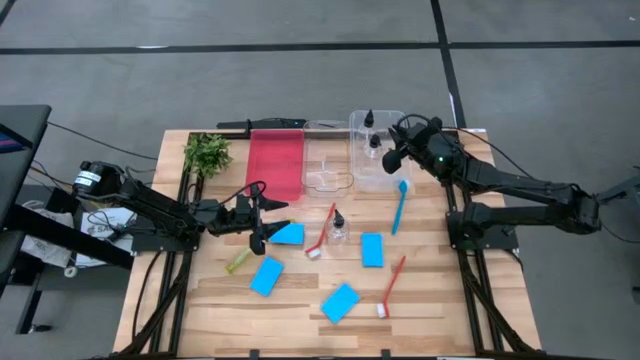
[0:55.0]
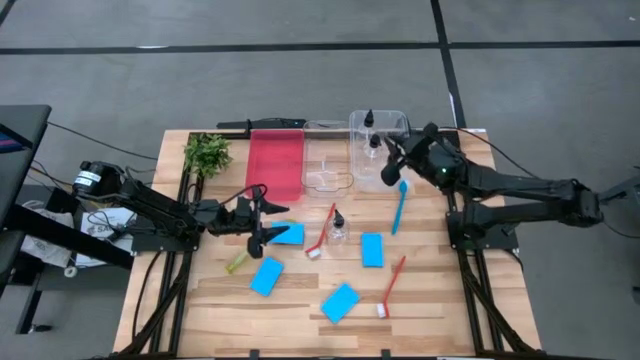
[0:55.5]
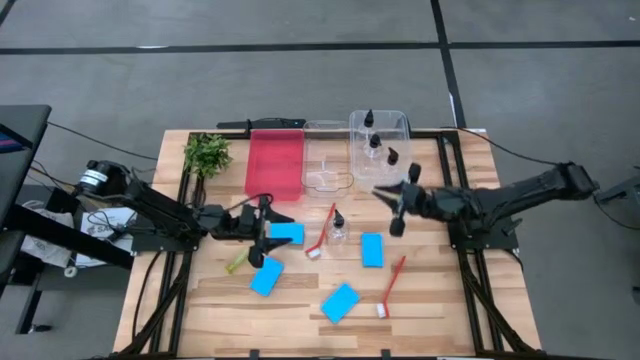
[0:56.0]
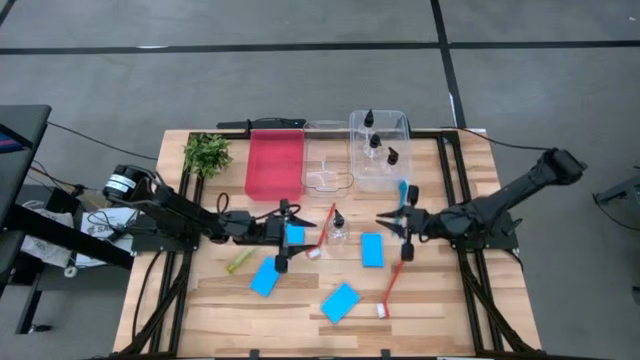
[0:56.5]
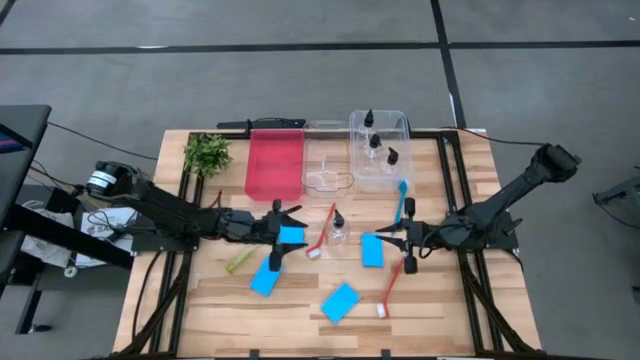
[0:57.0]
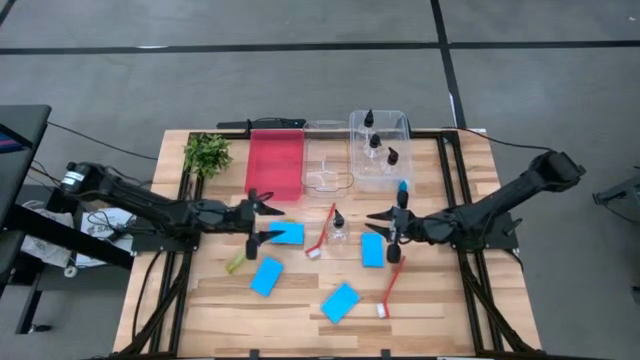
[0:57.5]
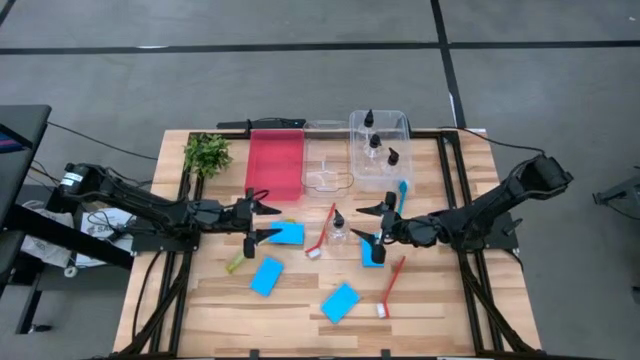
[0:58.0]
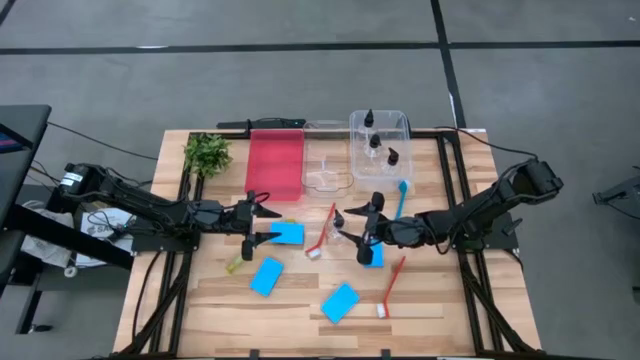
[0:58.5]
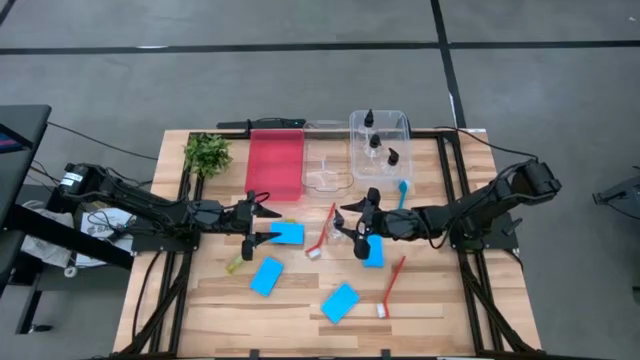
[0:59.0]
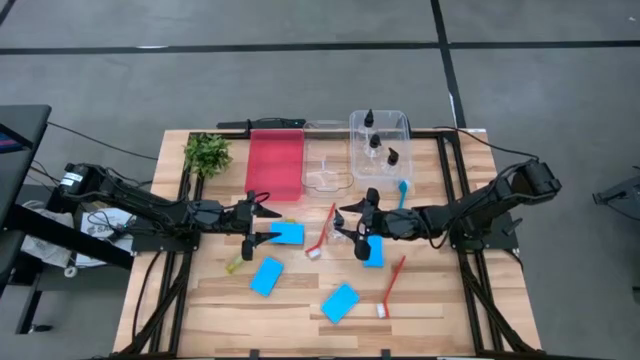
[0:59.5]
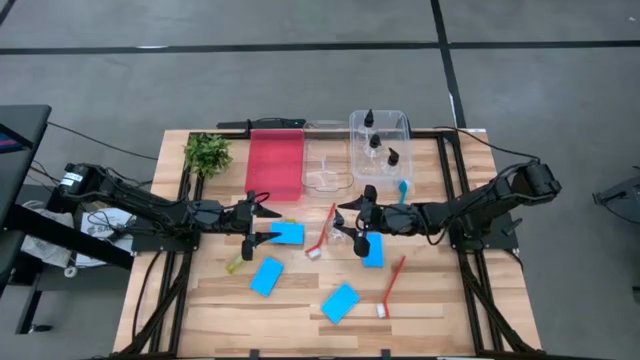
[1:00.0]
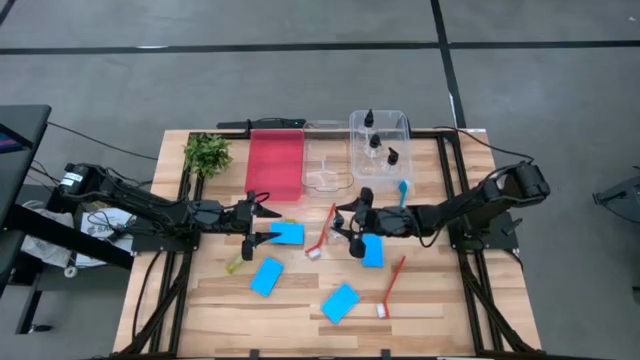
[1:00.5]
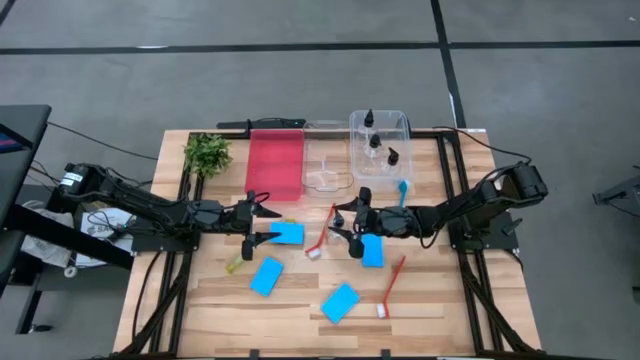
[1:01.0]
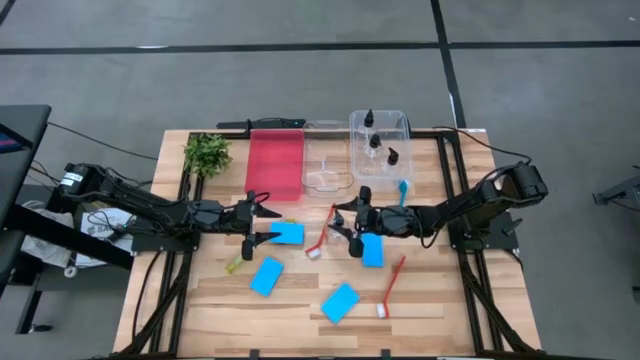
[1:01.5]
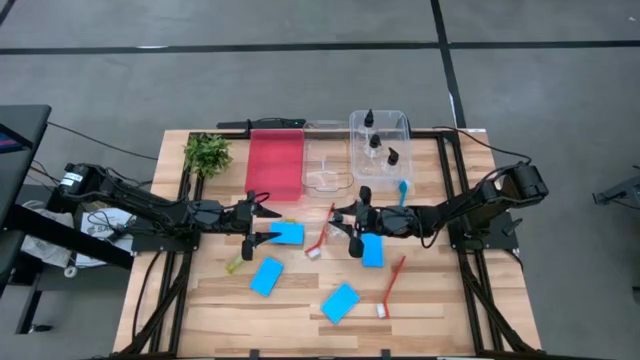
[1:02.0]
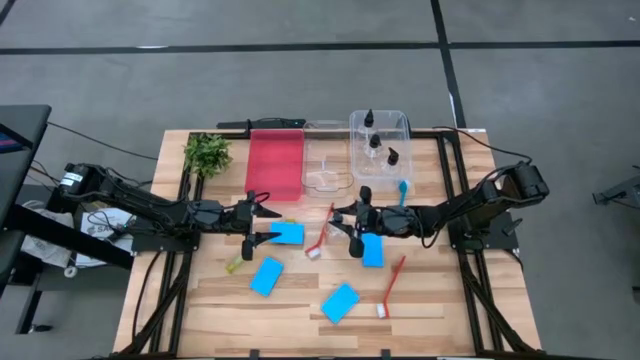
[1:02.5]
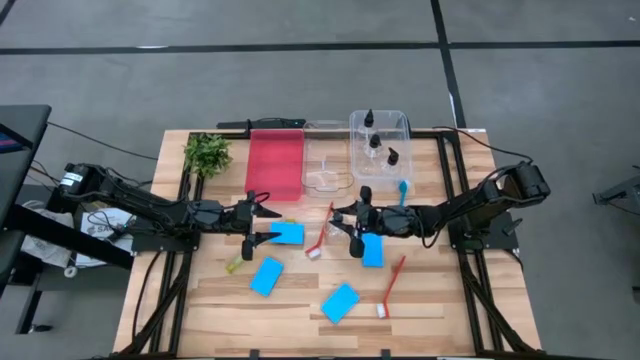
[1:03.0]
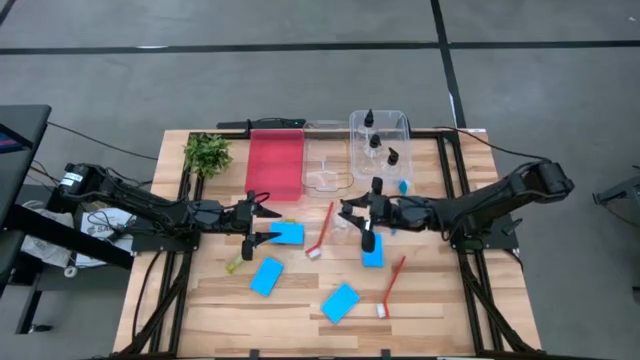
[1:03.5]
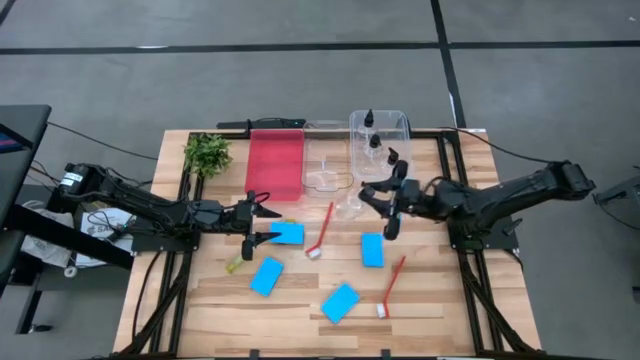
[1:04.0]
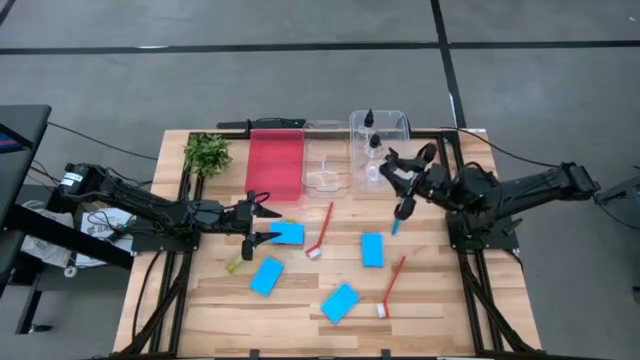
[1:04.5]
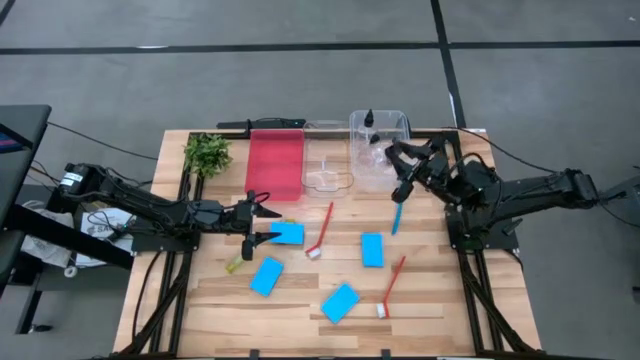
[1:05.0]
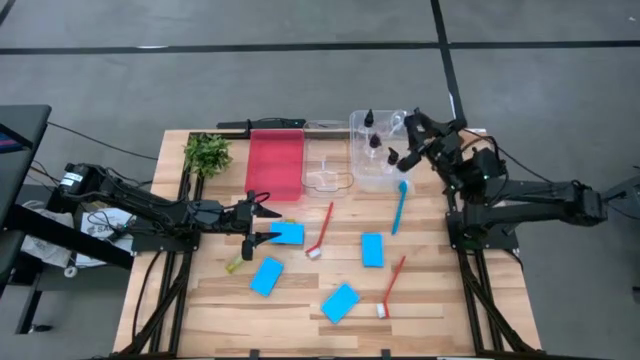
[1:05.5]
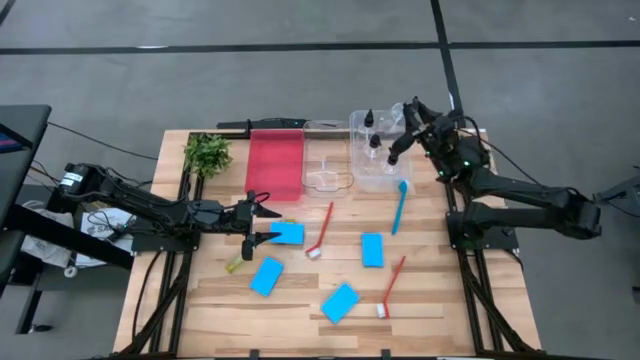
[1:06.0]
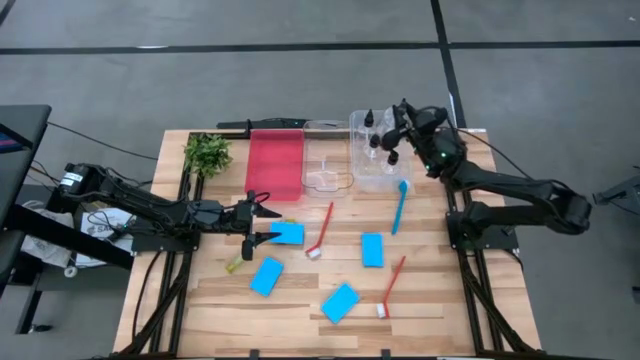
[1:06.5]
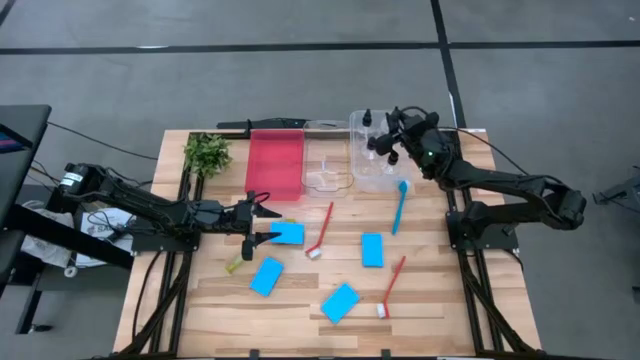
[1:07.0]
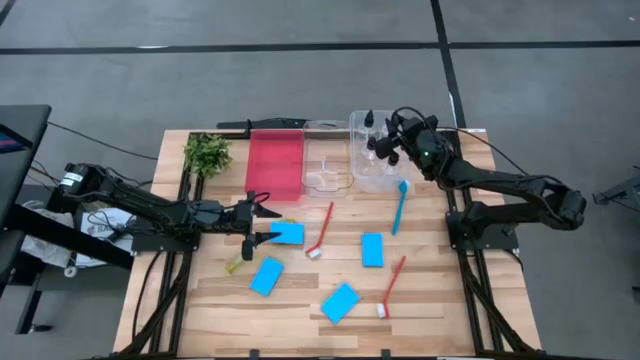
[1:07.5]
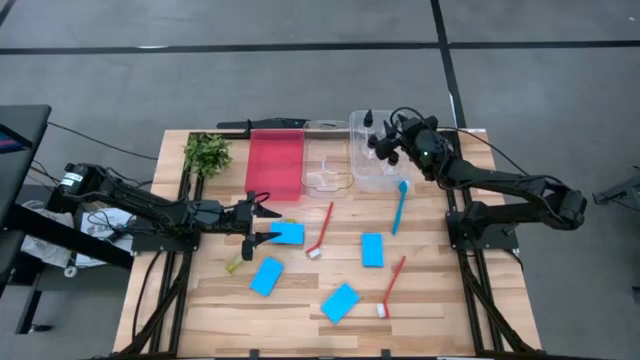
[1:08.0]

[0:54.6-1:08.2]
Task: Pick & Place Kitchen Sink Supplies
Put the soap dispenser into the right transparent bin

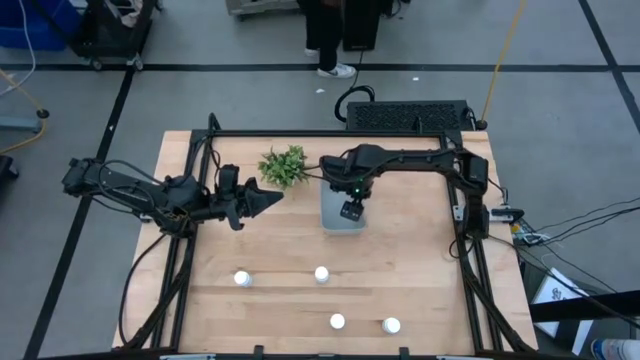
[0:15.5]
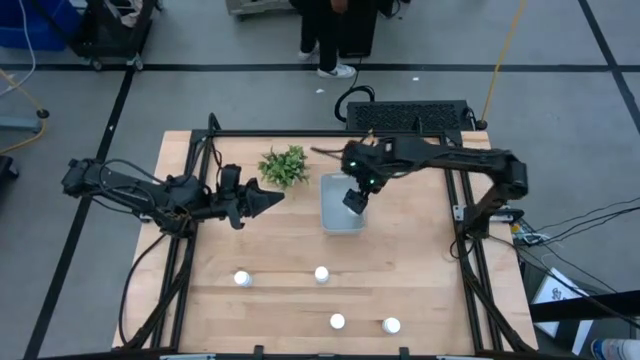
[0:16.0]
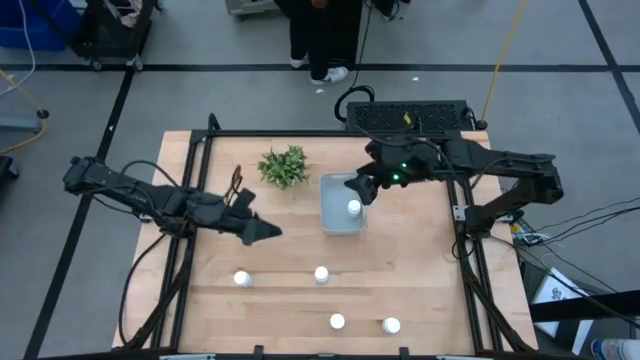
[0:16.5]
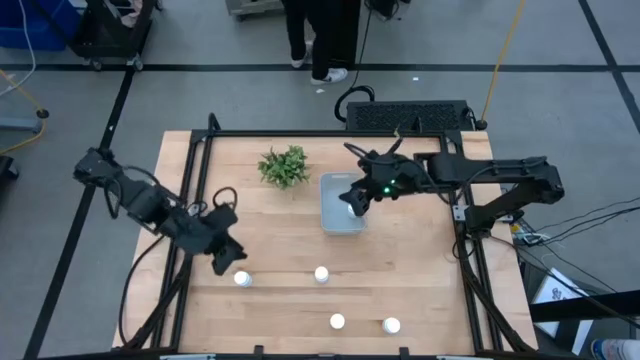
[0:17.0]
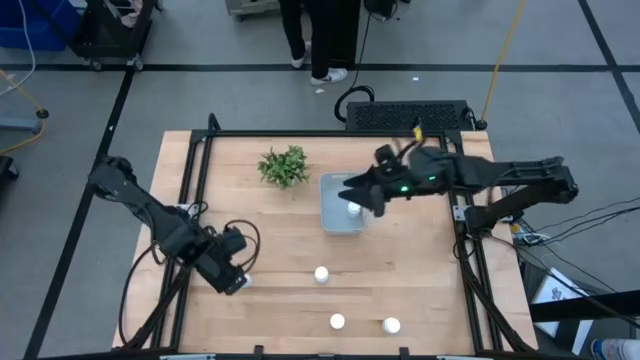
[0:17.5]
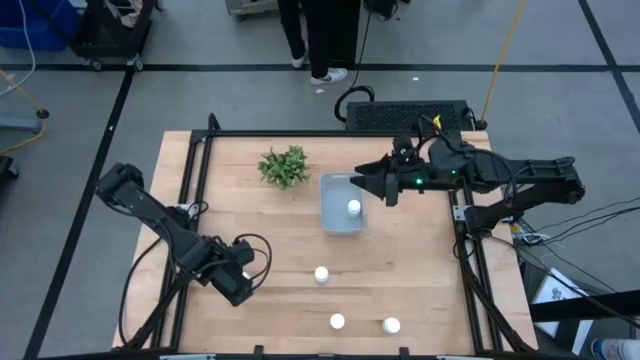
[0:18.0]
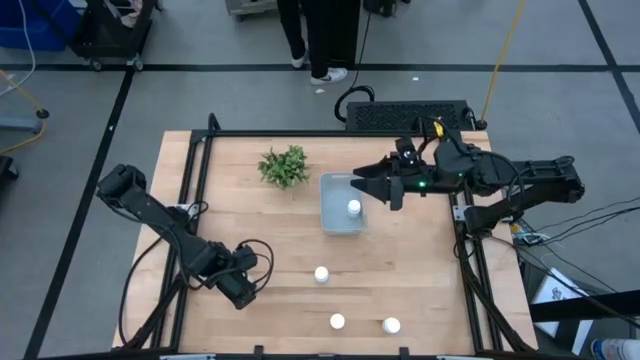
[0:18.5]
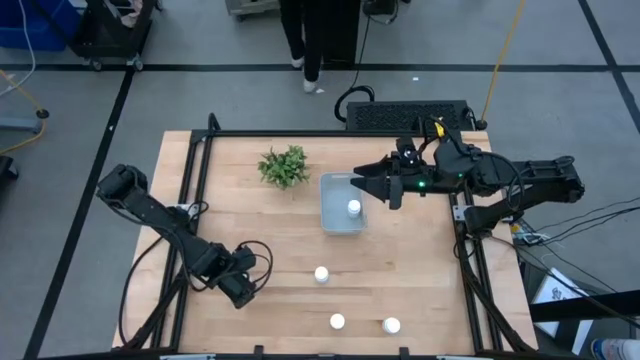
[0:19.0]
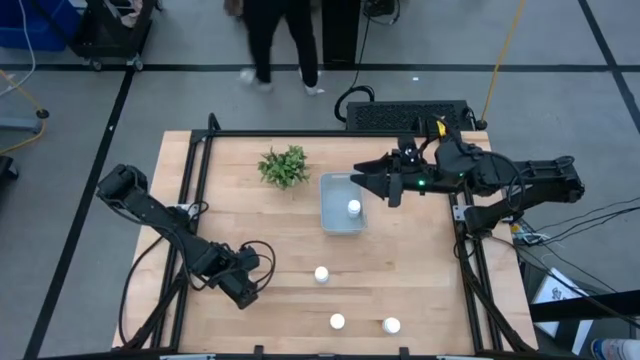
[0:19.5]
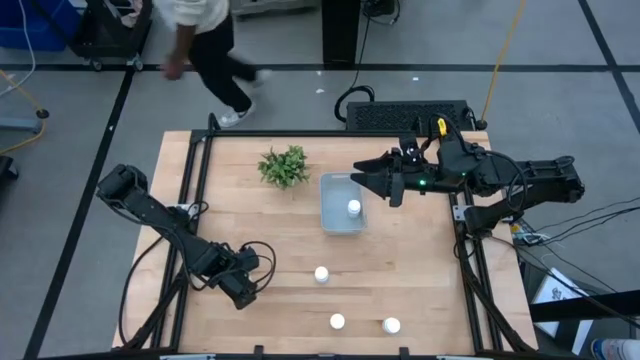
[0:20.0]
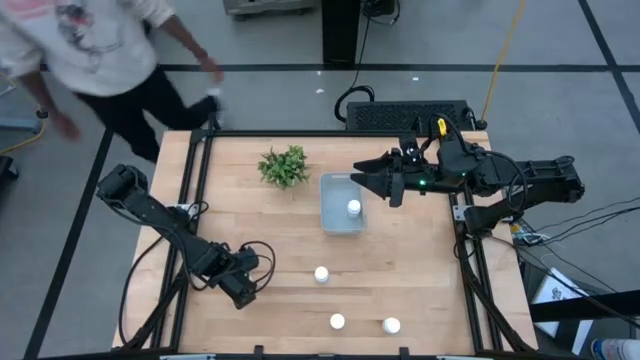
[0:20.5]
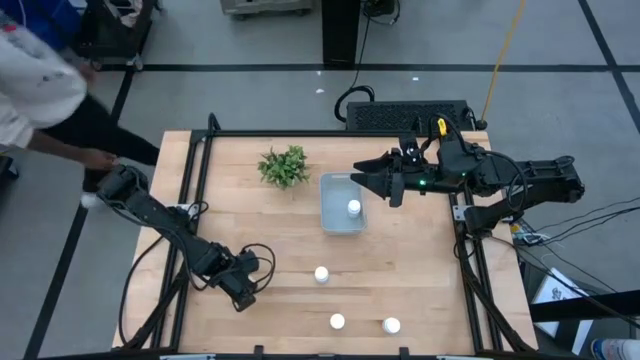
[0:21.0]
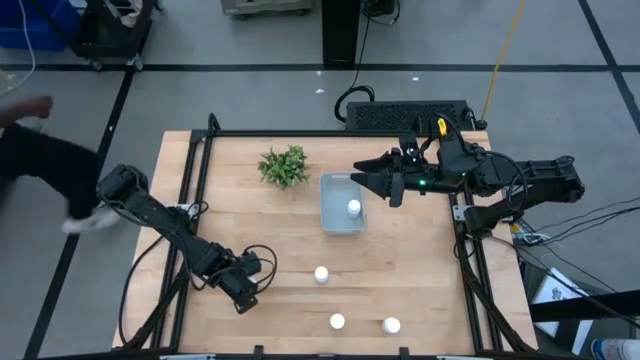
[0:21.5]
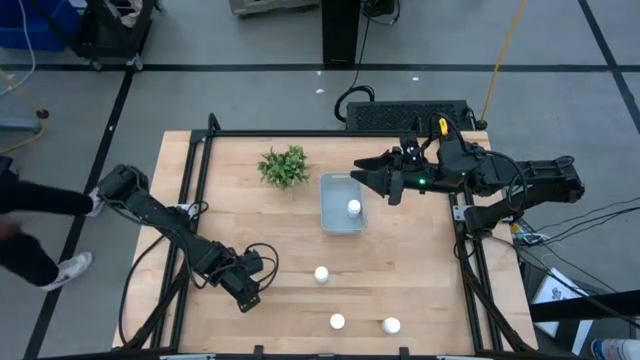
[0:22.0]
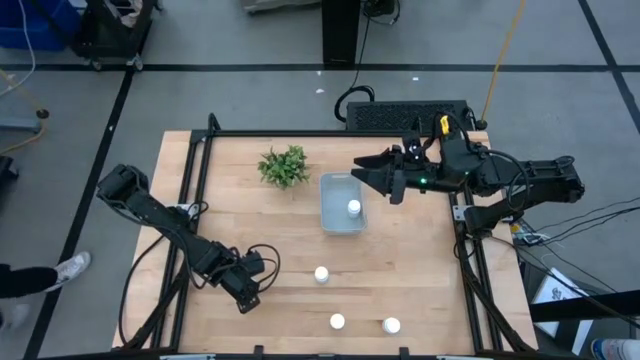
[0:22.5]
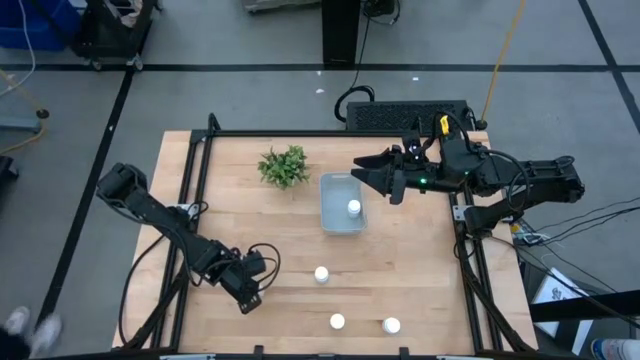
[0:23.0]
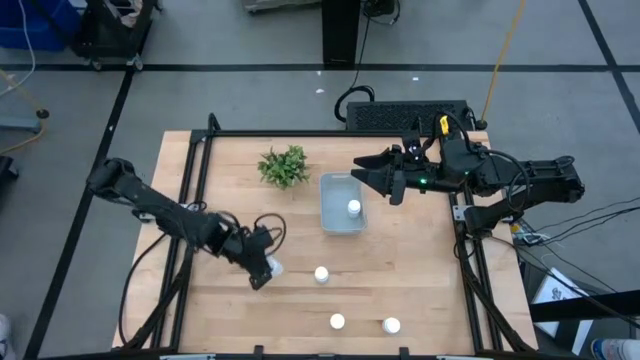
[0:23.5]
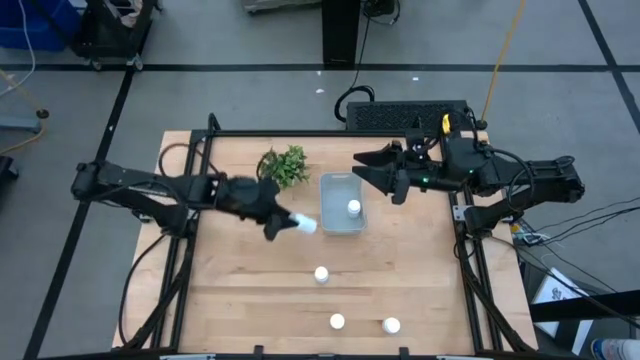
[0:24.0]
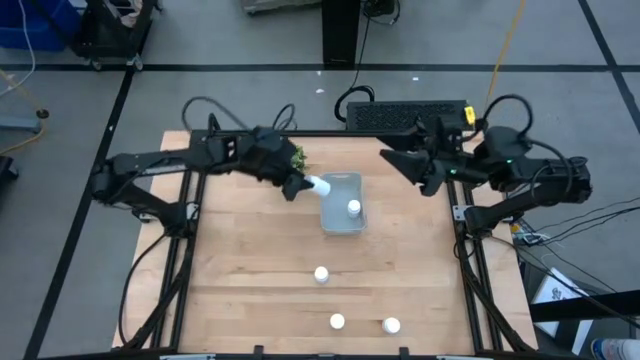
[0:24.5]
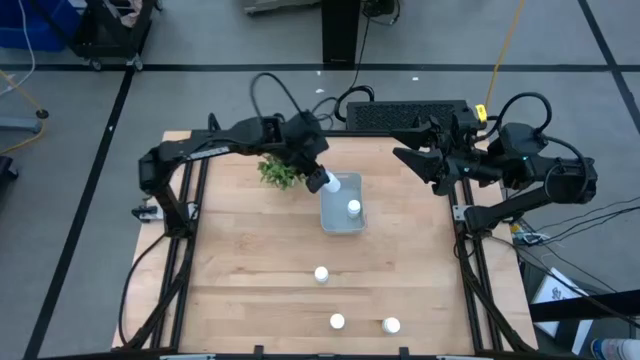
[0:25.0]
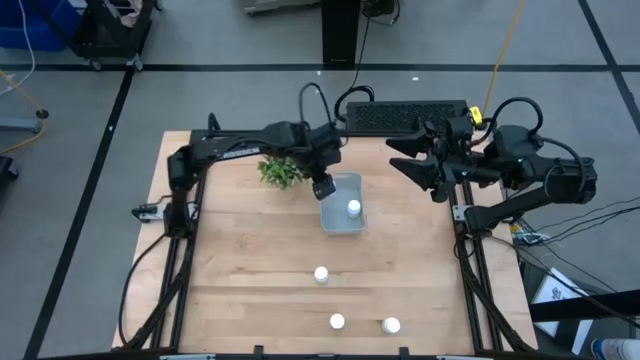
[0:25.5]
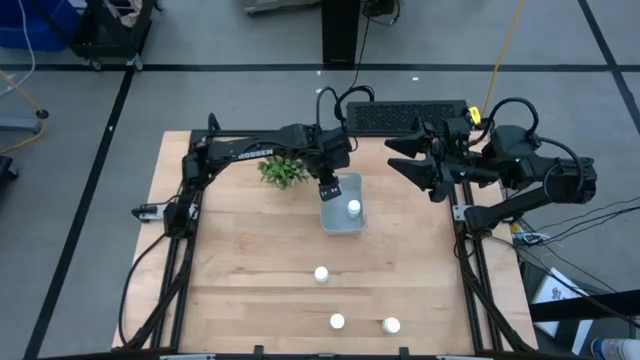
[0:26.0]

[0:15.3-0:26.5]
Task: Pick and place pill bottles into a basket
Put the white pill bottle into the gray bin
